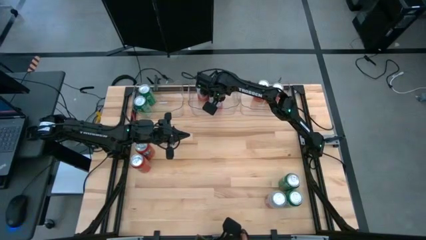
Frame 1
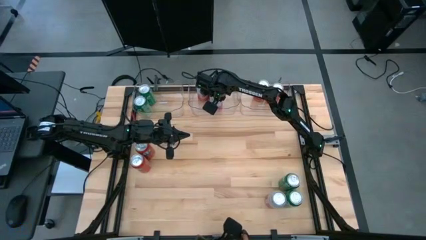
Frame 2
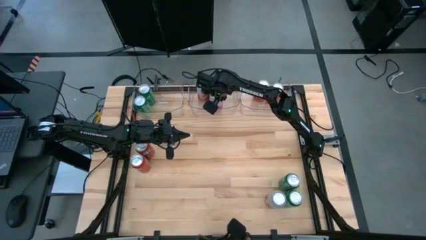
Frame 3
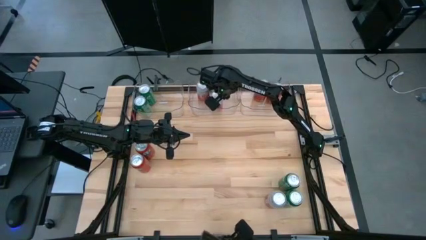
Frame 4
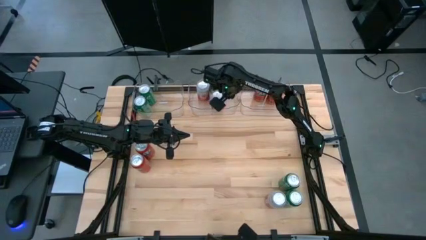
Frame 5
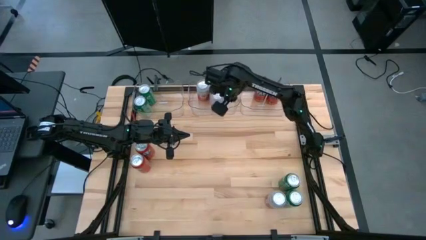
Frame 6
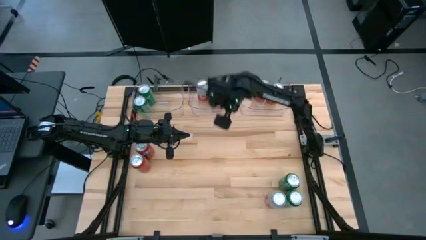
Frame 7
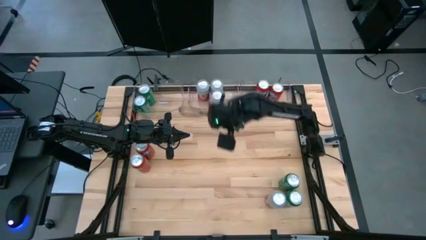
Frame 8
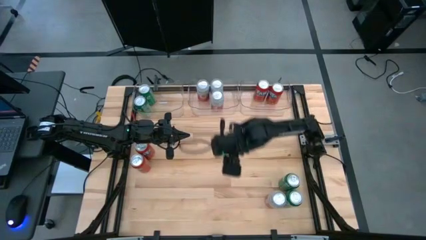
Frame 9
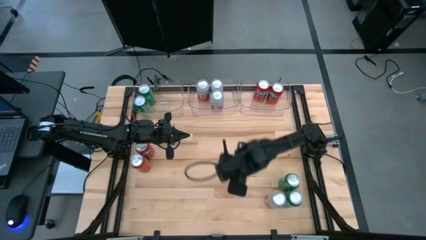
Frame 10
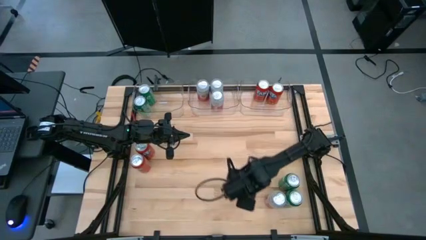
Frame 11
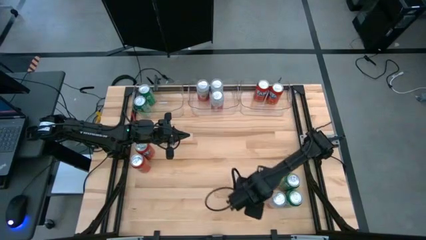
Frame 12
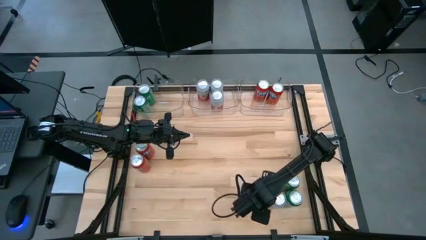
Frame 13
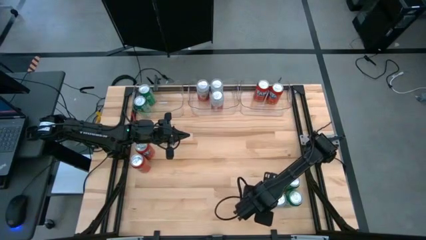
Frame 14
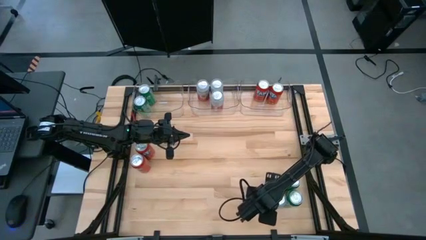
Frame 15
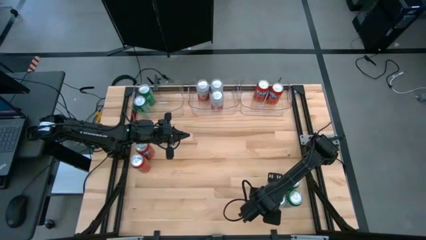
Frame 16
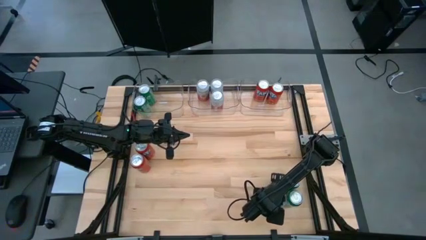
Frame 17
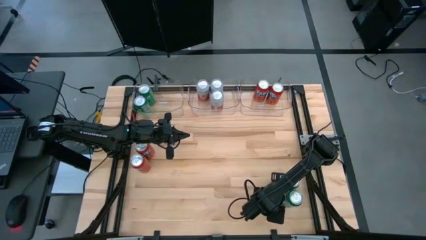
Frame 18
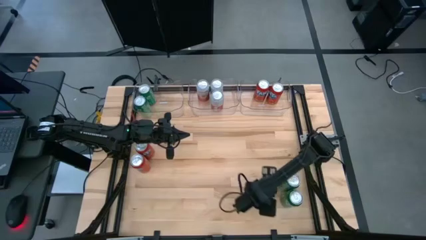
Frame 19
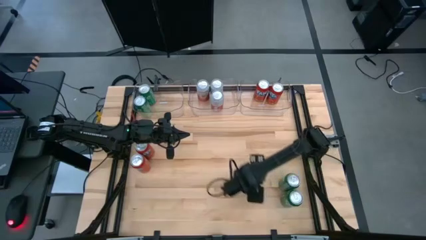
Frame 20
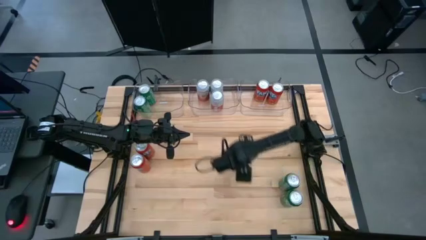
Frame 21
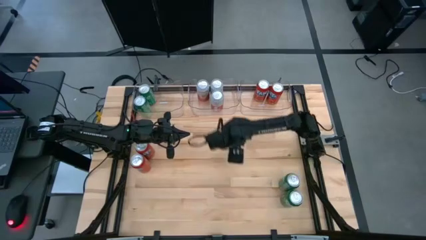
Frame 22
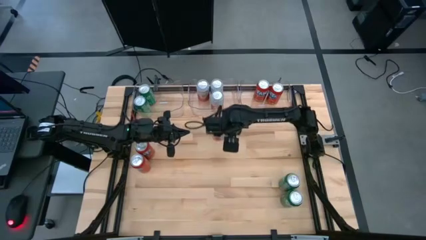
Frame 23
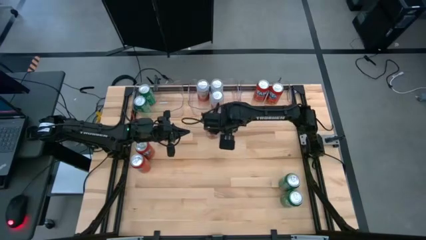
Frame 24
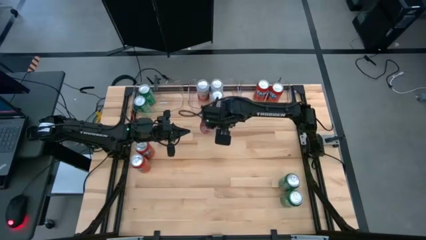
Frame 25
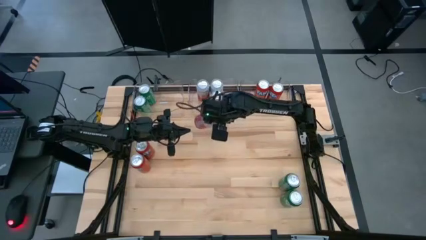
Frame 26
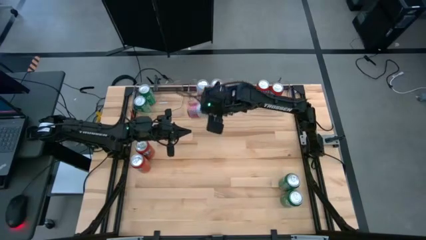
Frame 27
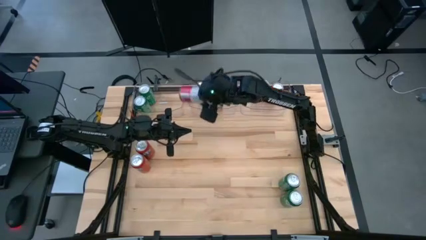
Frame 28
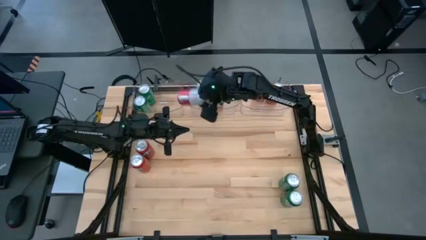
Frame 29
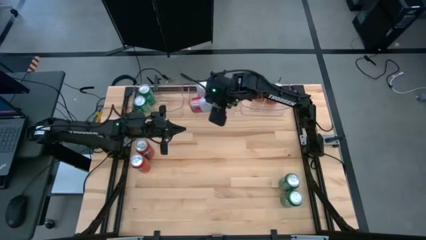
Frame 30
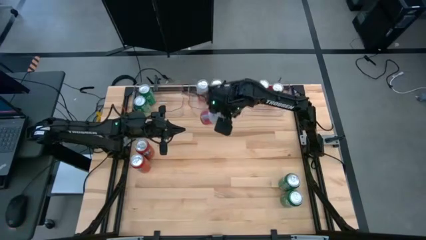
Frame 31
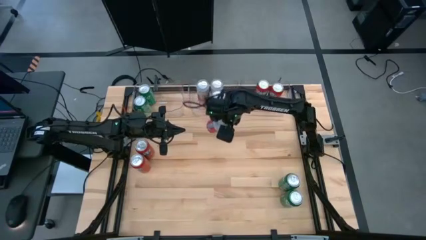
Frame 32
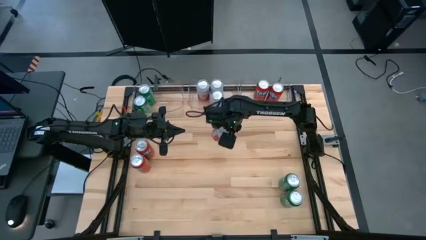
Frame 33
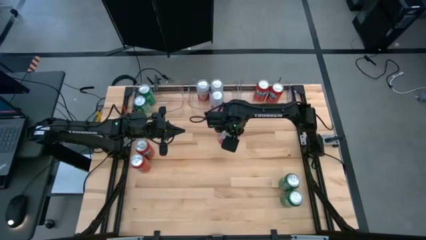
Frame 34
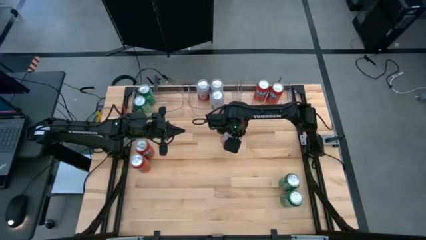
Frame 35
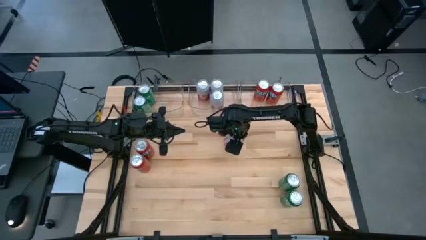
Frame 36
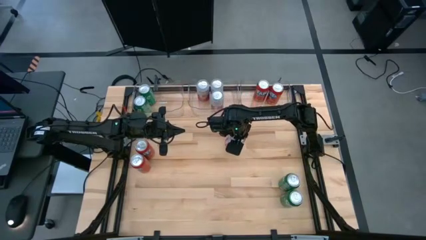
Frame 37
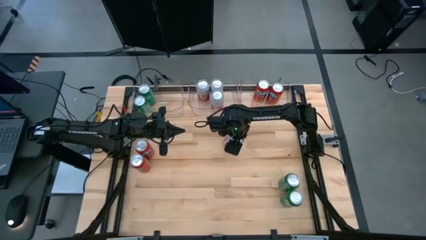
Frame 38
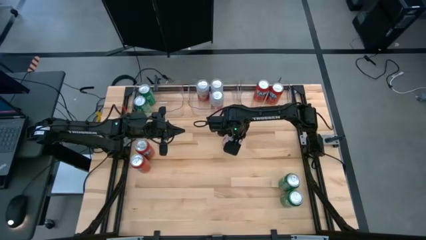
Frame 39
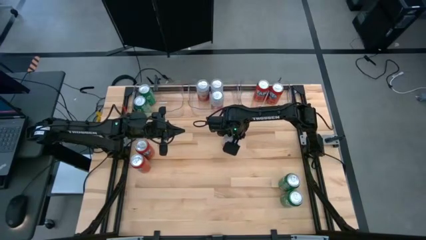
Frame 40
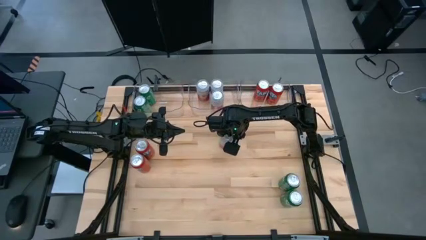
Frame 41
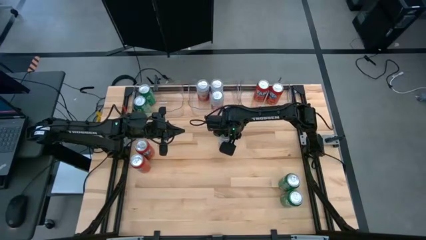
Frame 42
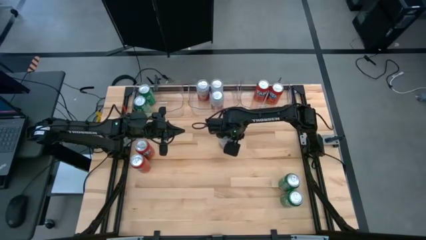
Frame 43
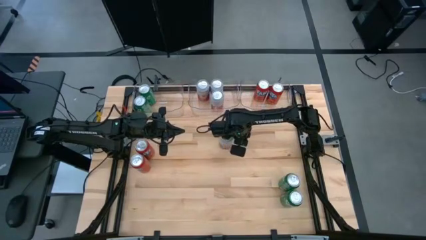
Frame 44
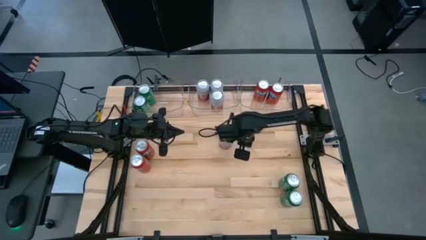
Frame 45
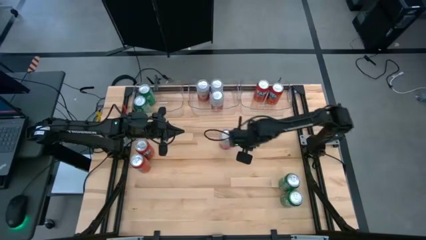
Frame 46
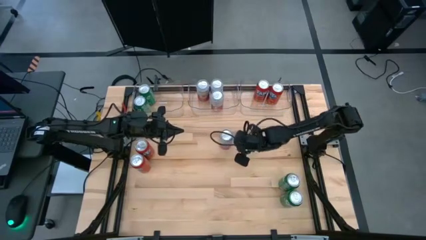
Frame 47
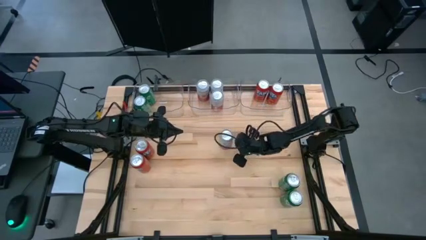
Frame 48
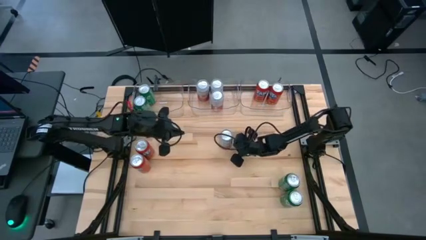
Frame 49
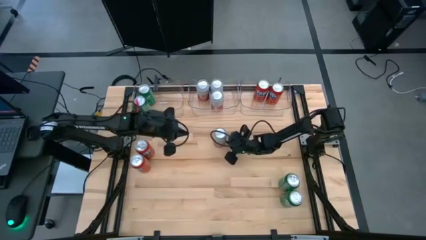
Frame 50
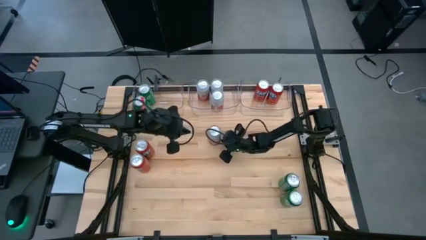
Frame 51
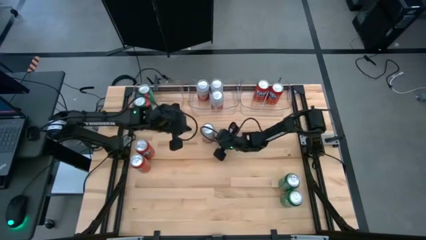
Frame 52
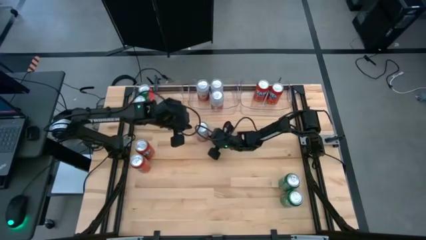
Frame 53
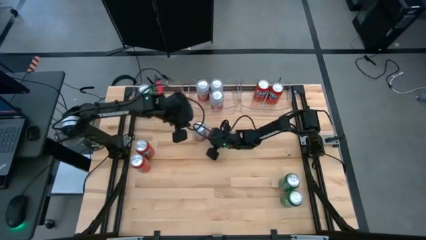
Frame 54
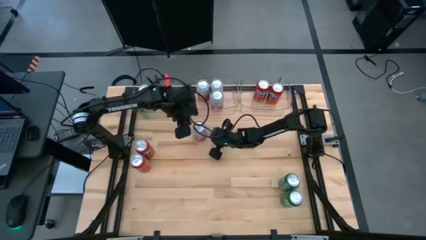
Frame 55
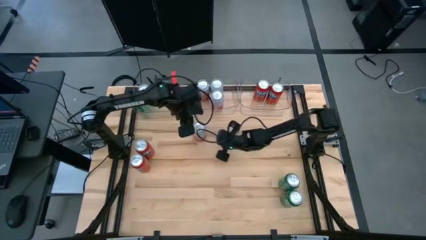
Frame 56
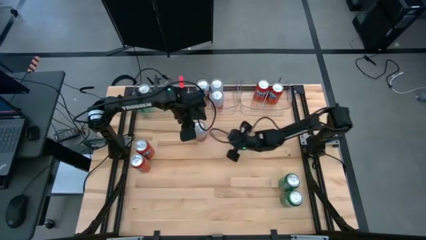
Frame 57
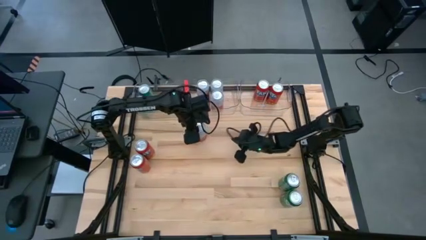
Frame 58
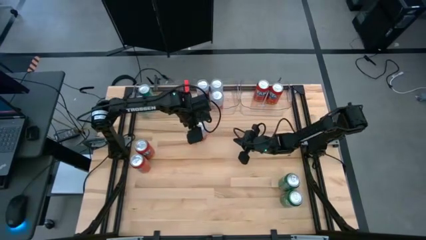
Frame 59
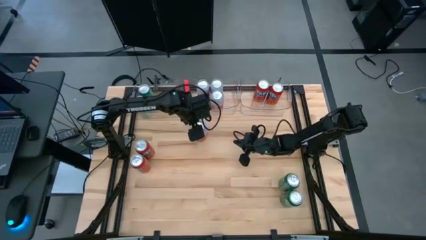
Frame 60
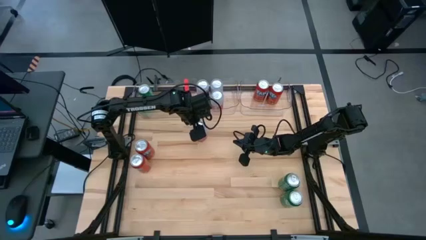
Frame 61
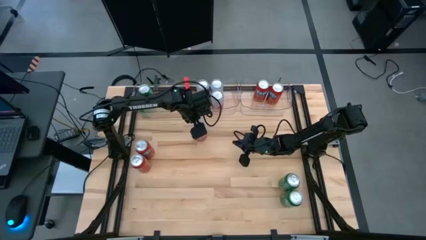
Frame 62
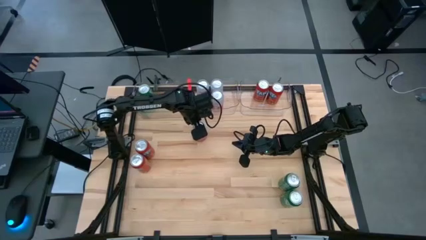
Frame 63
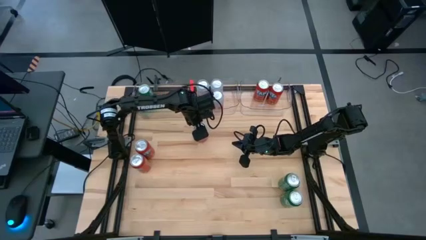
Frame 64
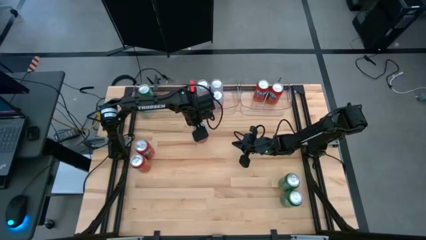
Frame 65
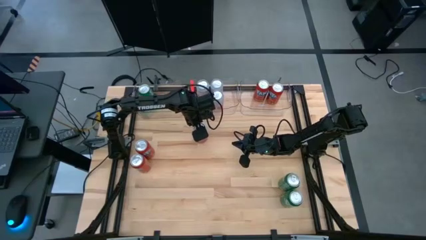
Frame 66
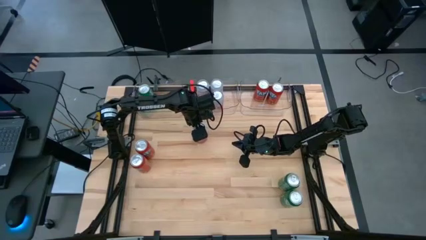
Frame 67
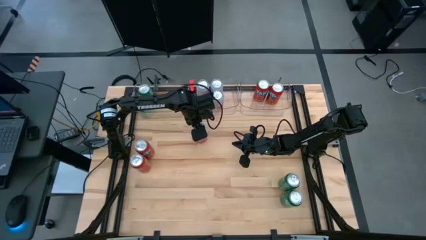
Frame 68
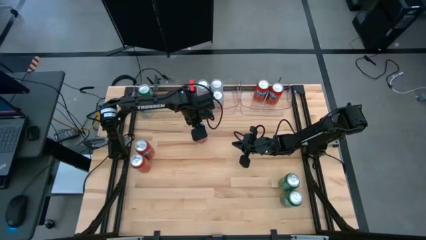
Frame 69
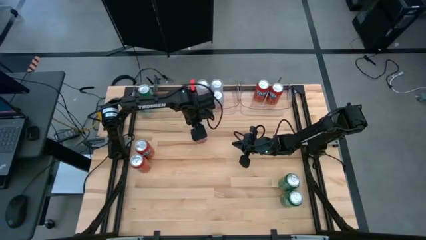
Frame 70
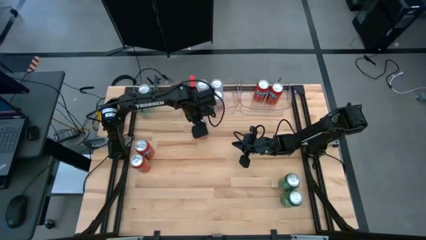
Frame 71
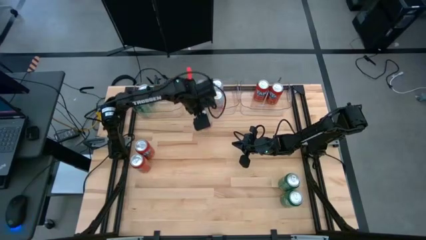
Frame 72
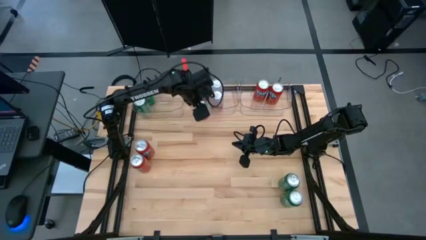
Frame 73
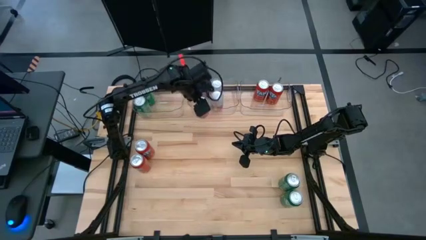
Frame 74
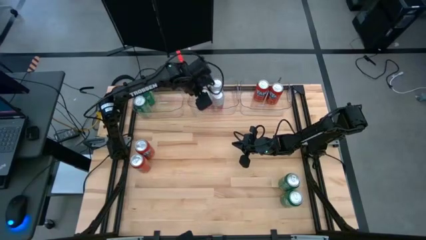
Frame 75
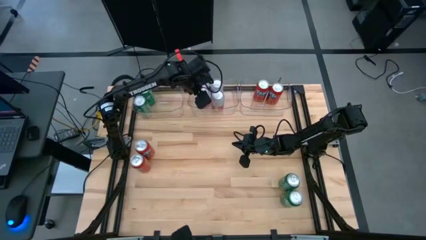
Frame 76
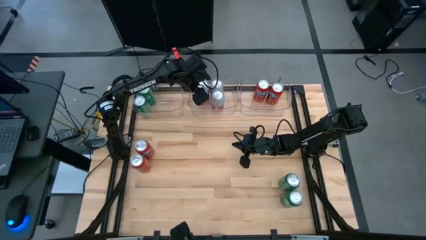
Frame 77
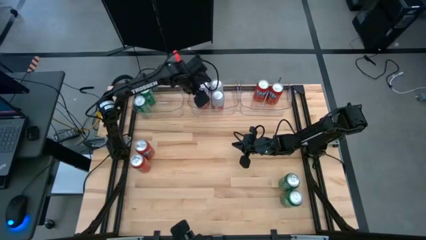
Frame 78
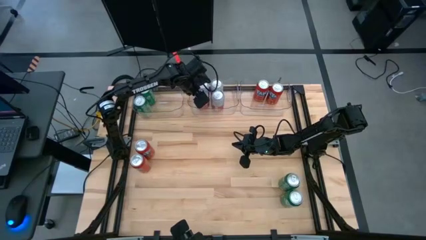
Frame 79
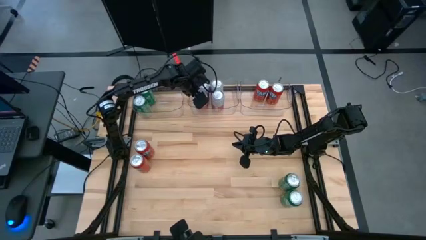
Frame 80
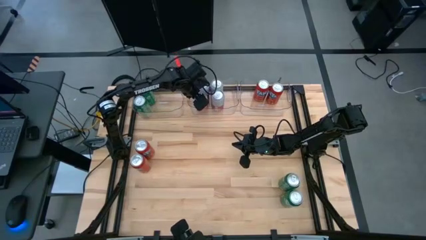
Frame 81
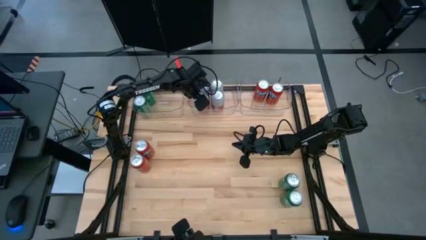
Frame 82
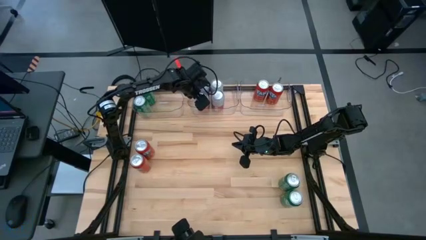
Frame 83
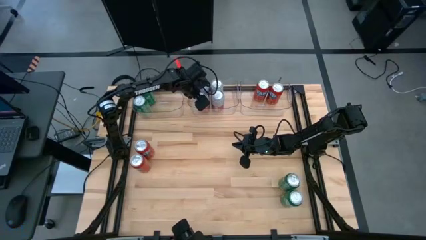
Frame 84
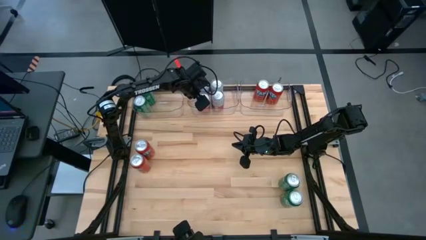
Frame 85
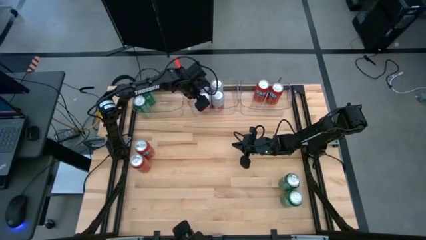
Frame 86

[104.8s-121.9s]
Task: Sort soda cans
Put the pink-white soda can into the top center transparent bin
